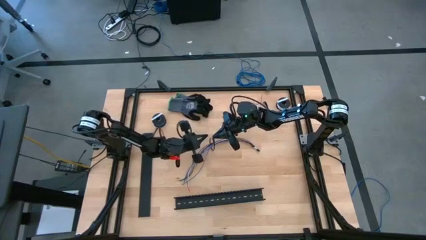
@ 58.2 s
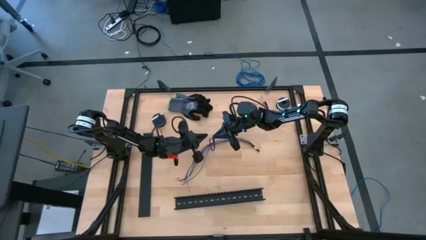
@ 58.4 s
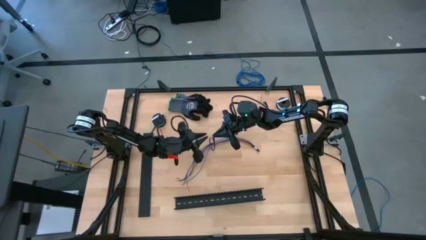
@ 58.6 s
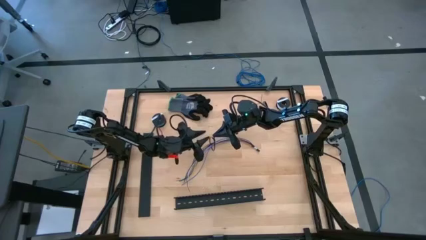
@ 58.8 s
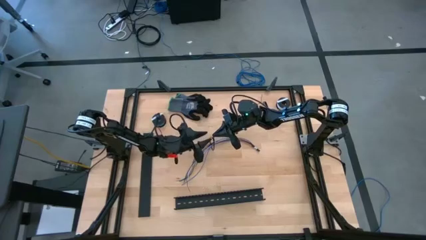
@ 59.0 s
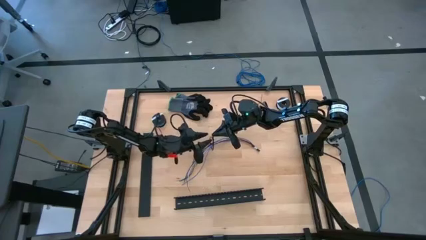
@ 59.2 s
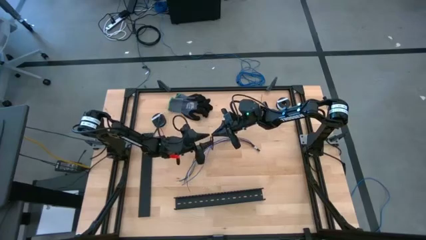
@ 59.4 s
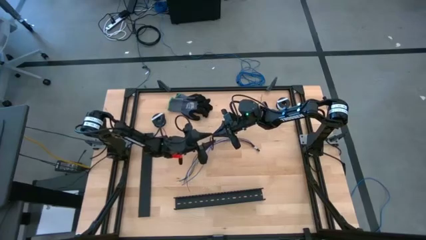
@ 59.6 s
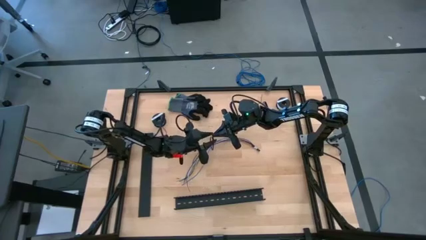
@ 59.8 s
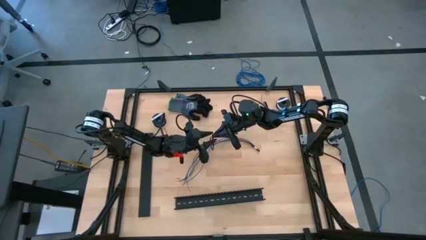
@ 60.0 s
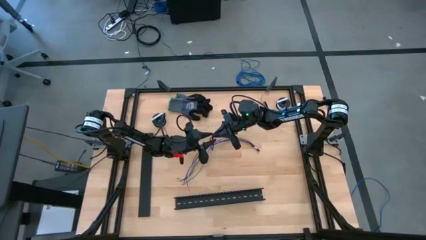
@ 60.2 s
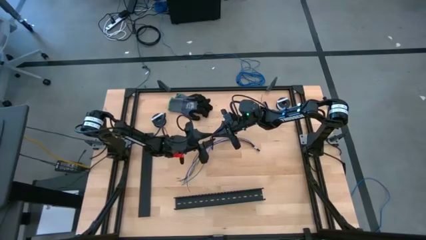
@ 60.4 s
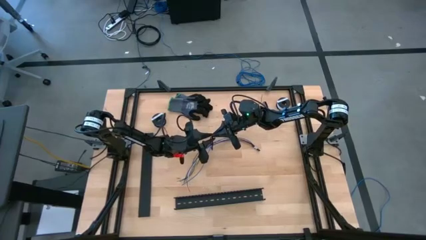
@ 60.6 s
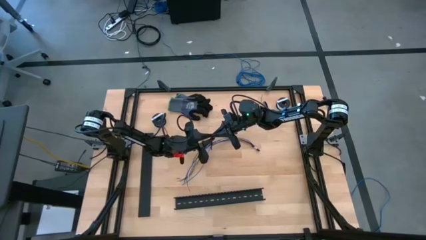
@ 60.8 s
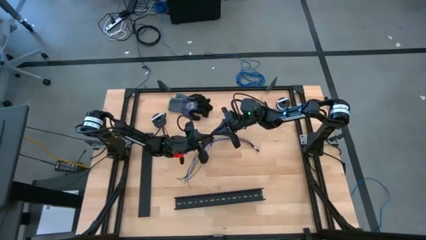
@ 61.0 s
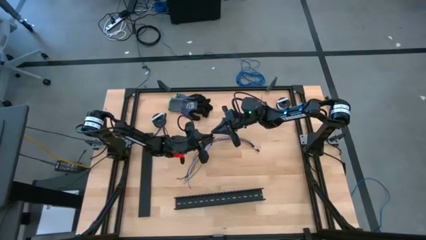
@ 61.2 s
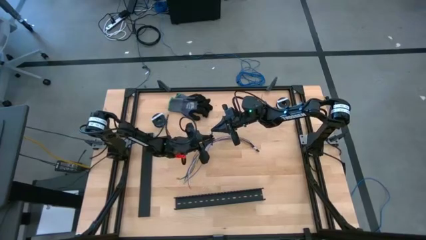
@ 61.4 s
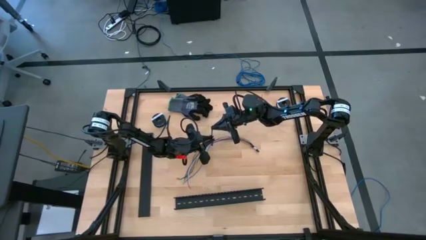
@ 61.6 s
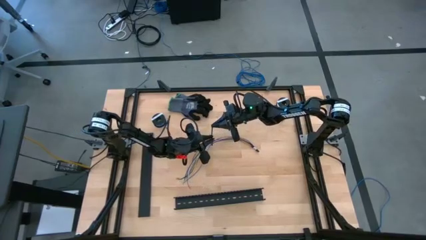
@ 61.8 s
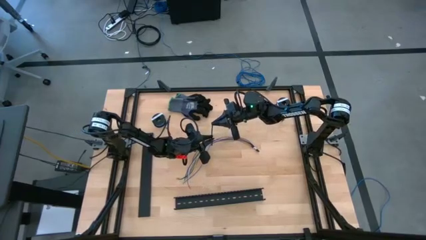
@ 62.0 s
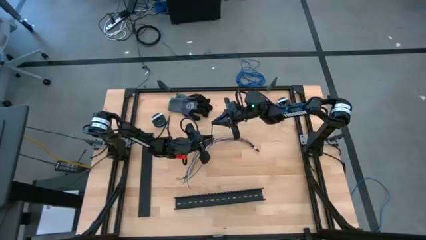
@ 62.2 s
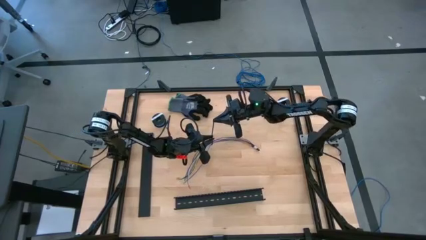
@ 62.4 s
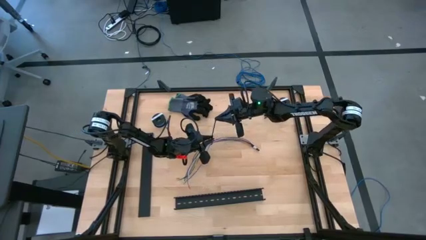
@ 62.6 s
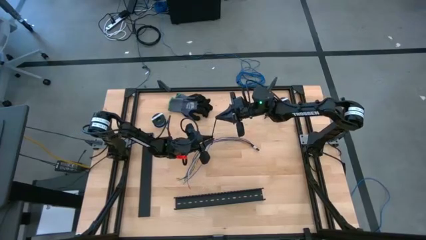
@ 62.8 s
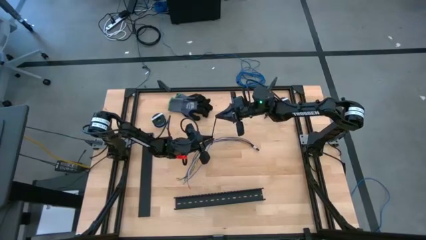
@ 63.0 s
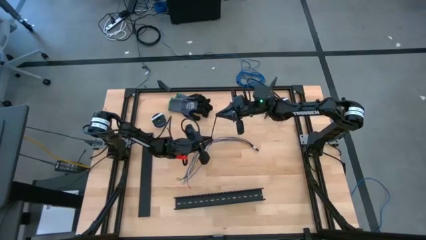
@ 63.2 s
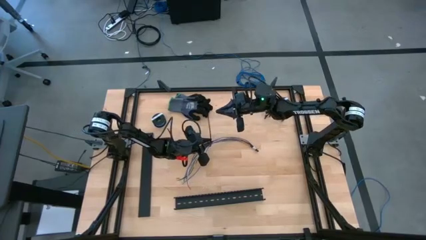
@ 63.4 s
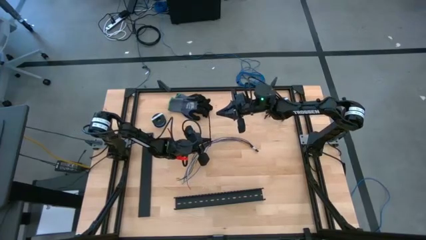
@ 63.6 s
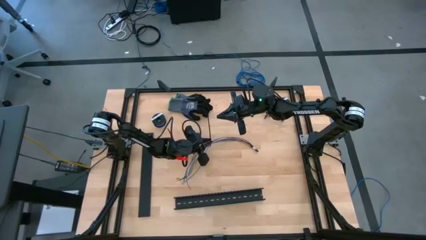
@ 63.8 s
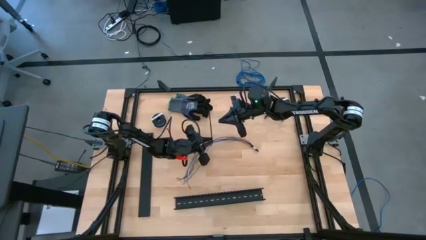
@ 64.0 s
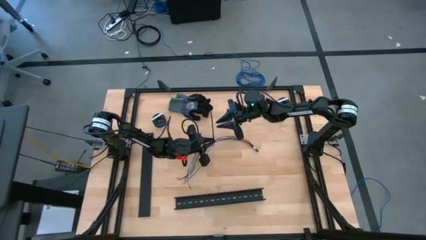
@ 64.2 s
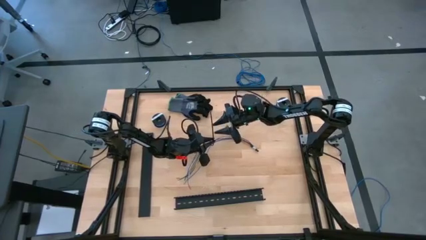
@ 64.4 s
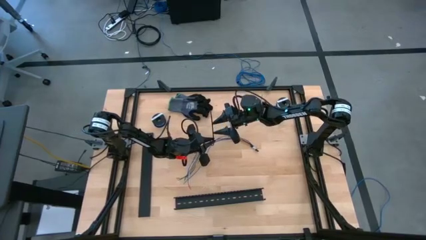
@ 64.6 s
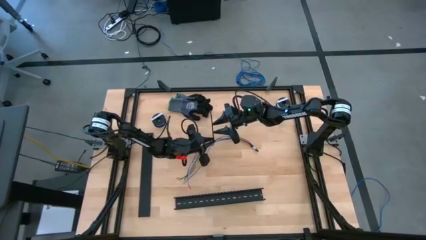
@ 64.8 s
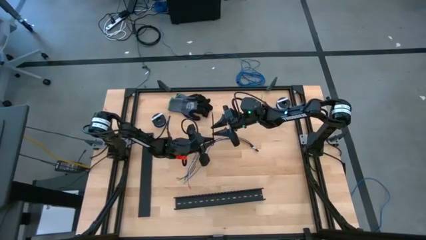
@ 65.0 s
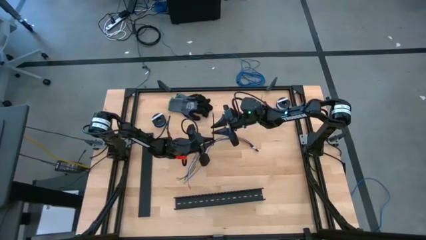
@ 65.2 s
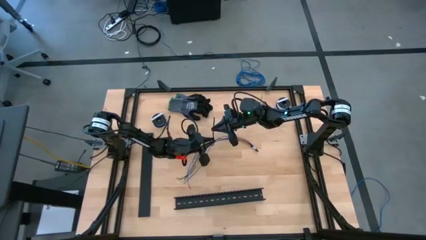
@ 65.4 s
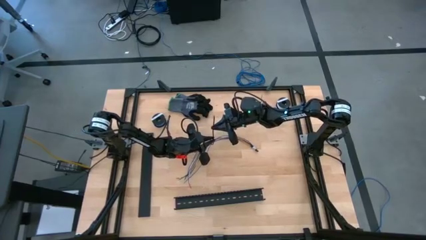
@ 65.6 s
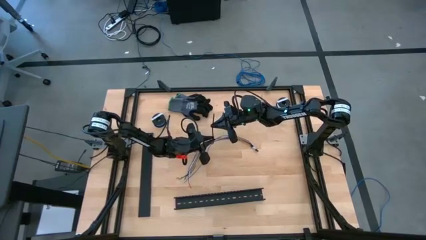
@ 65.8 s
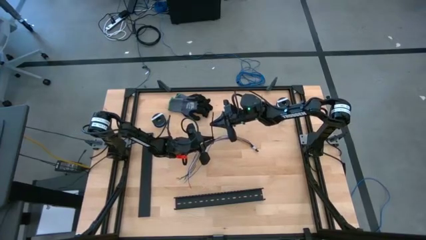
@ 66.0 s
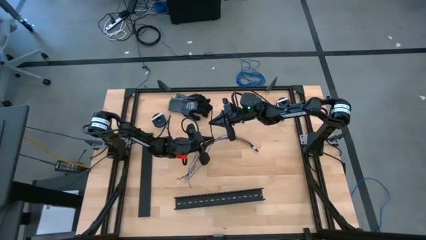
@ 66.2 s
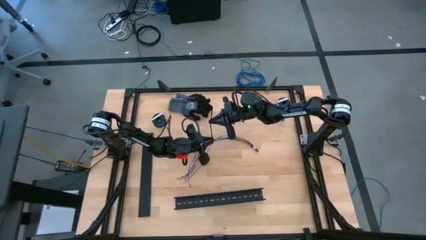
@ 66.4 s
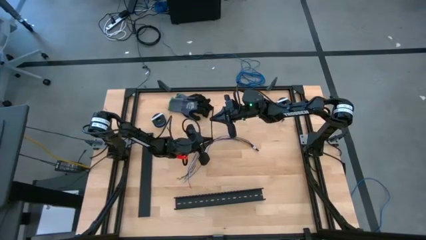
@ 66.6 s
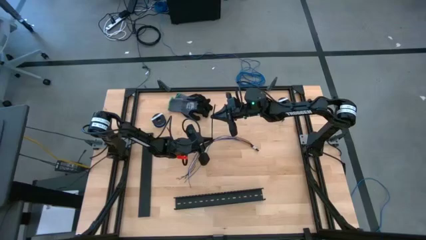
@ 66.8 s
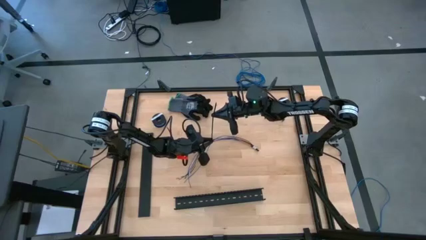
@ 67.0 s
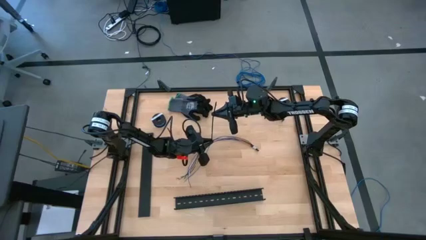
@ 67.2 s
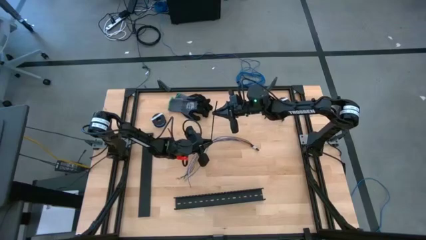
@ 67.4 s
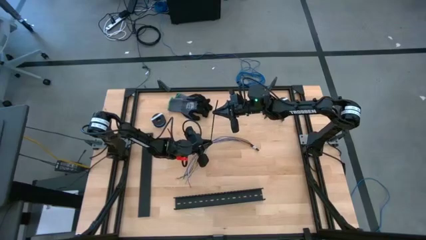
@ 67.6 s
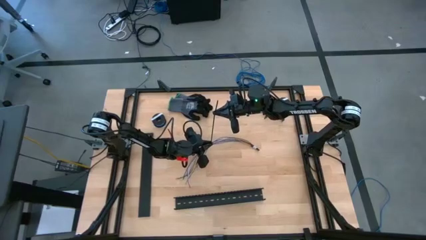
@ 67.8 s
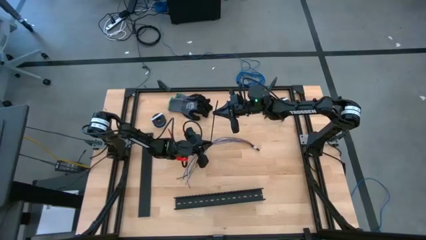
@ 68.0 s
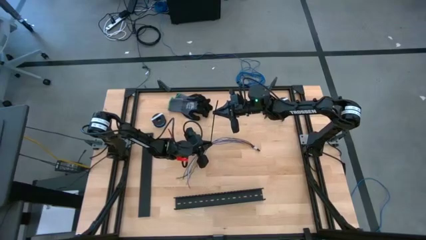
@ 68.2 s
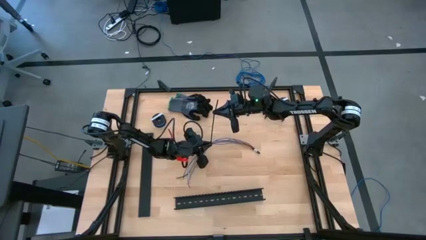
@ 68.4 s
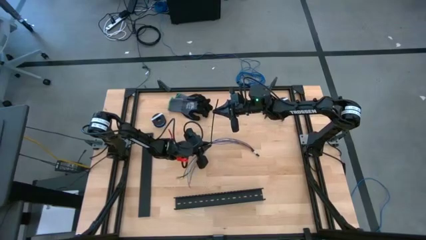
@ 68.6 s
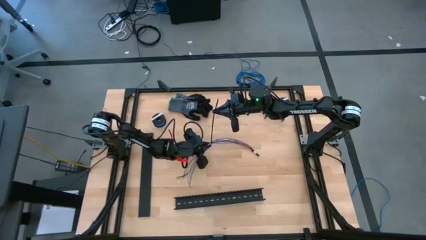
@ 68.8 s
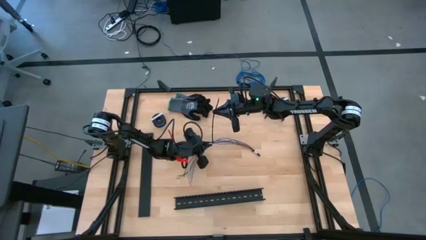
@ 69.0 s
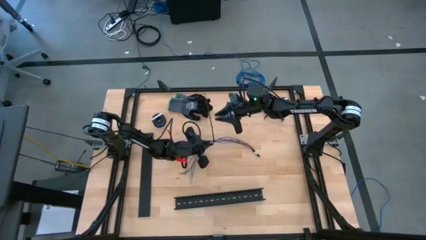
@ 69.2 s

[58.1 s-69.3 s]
Task: Ziptie cables
Wrap the cables together using the black zip tie
